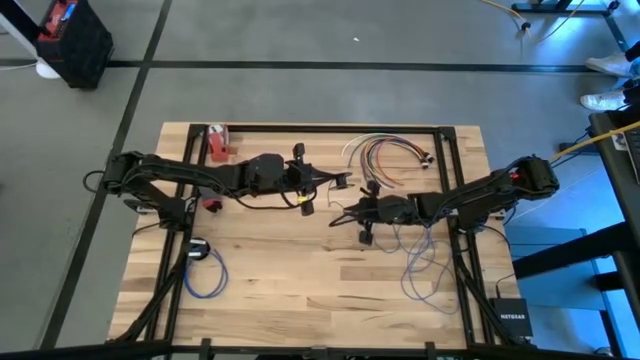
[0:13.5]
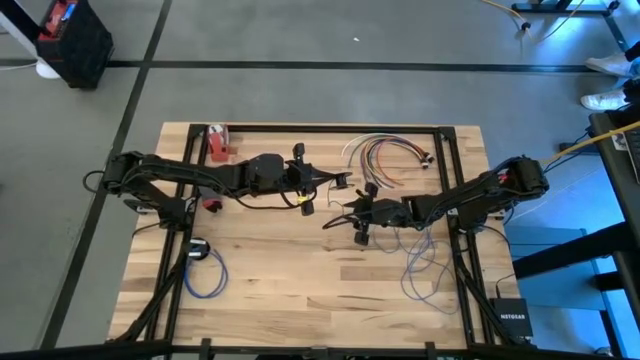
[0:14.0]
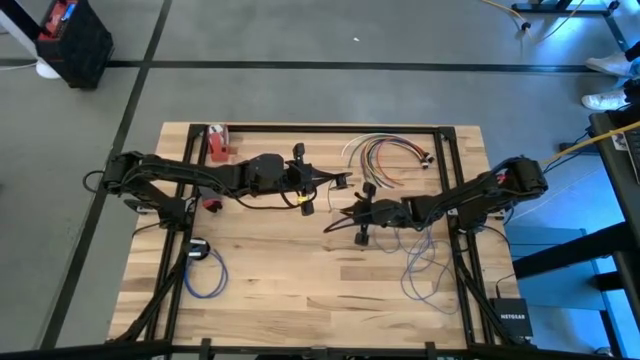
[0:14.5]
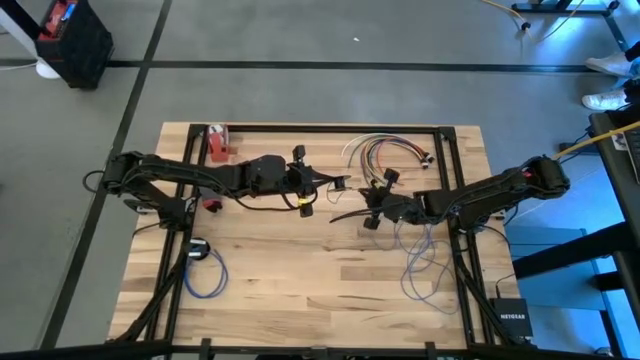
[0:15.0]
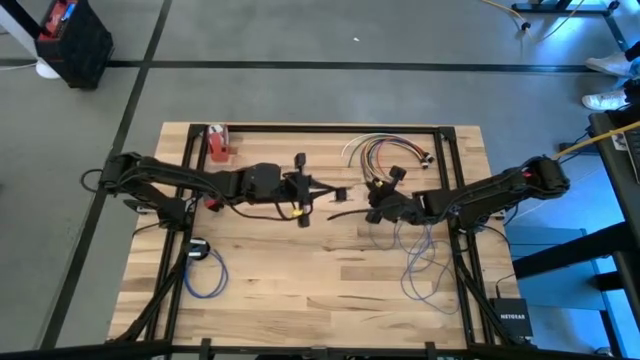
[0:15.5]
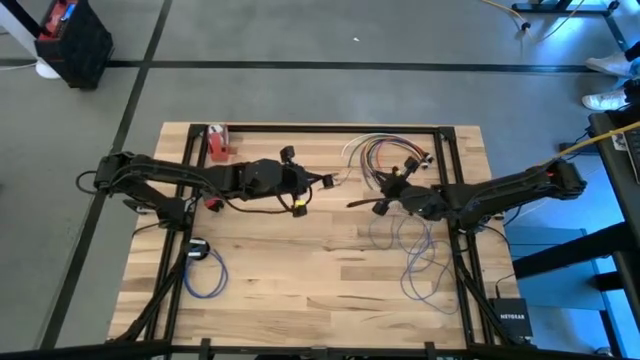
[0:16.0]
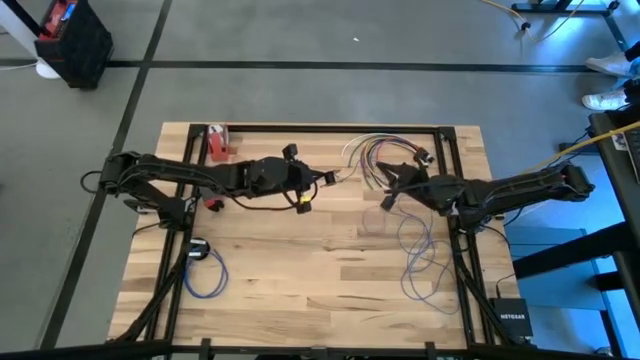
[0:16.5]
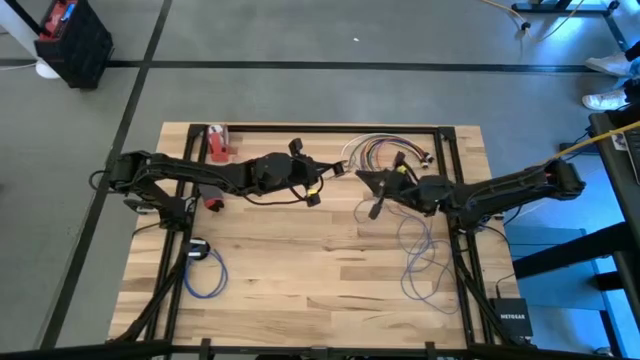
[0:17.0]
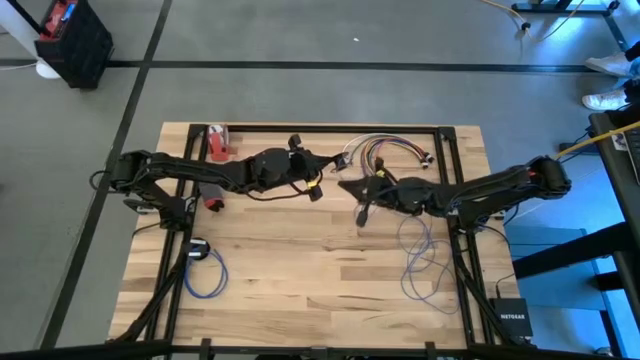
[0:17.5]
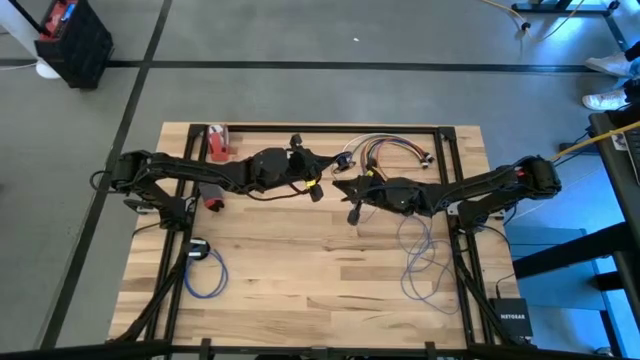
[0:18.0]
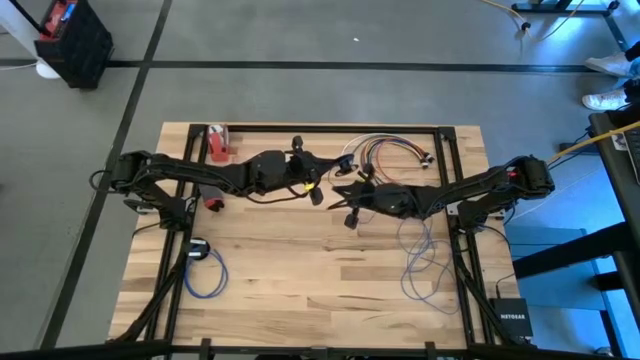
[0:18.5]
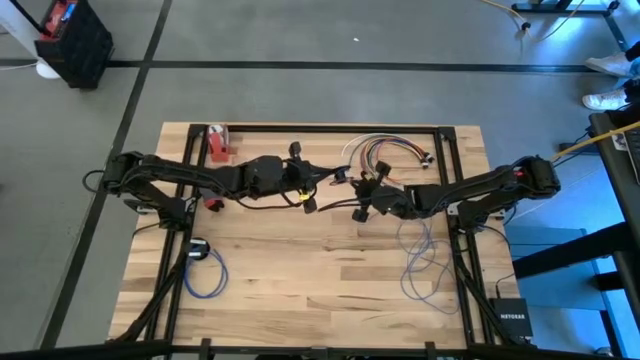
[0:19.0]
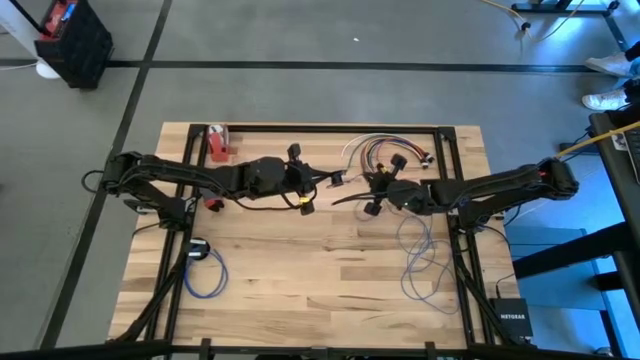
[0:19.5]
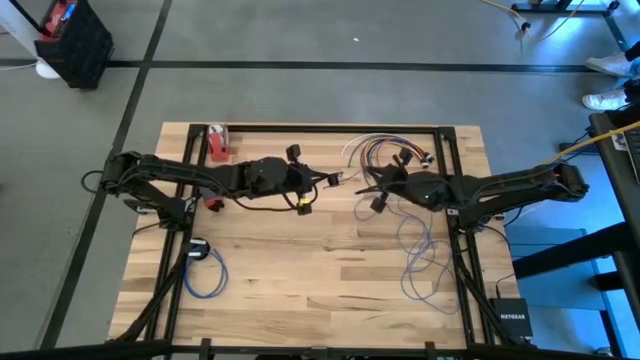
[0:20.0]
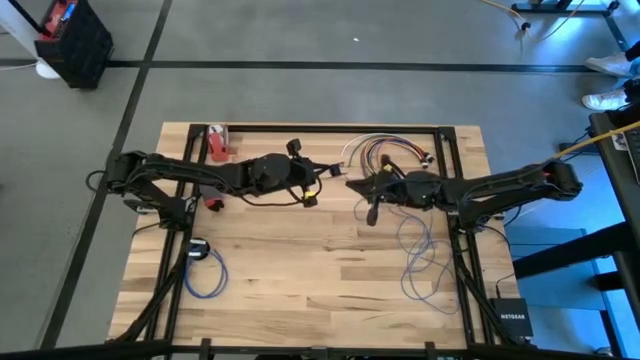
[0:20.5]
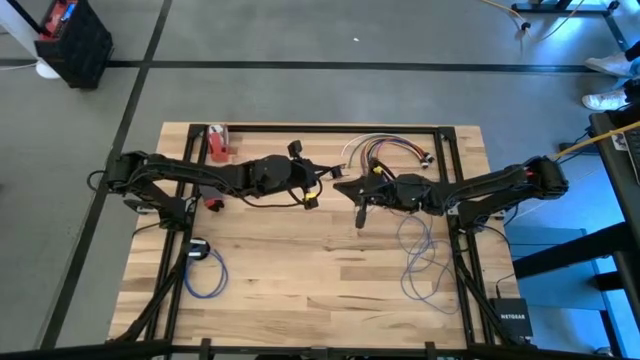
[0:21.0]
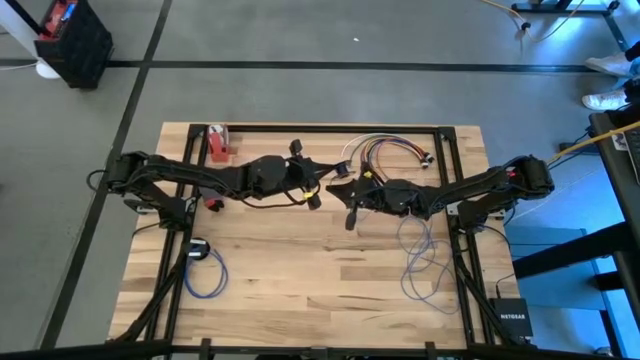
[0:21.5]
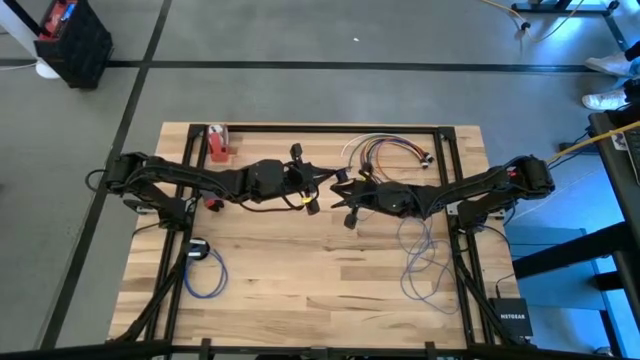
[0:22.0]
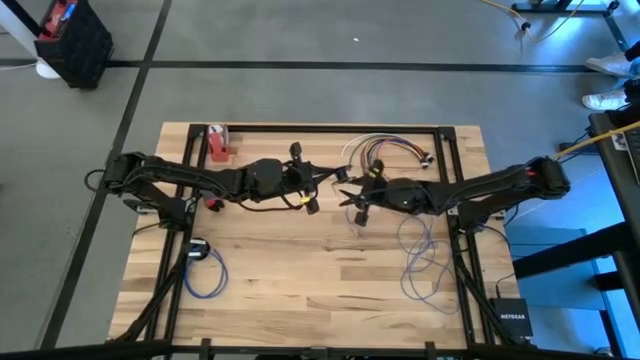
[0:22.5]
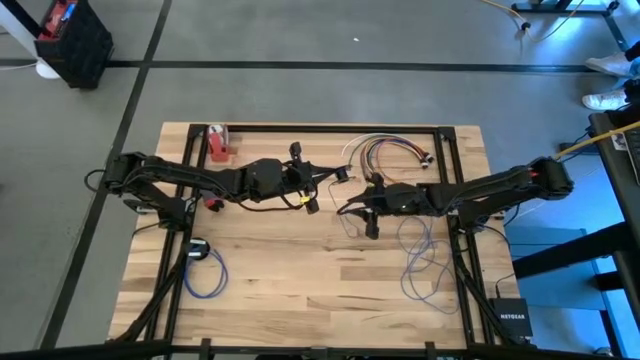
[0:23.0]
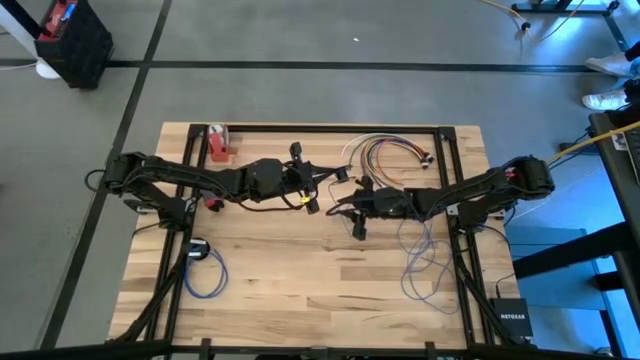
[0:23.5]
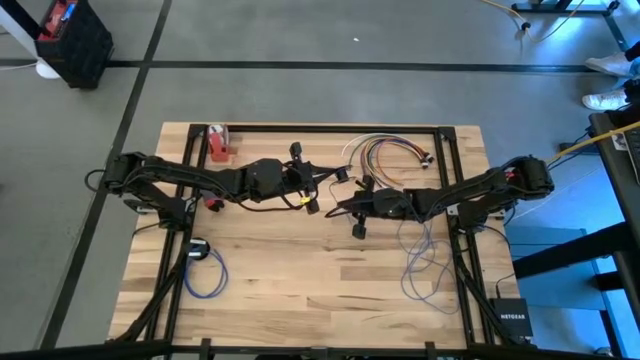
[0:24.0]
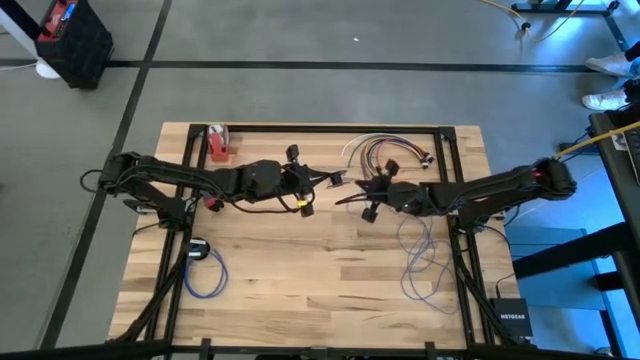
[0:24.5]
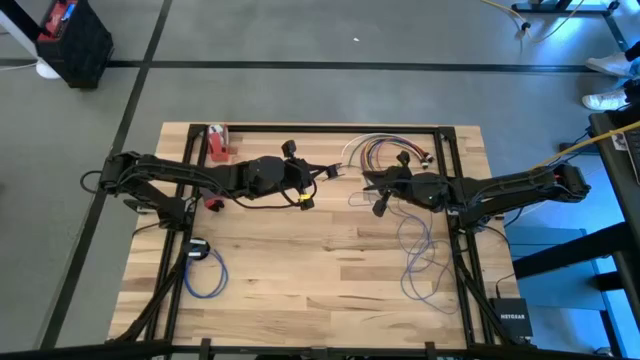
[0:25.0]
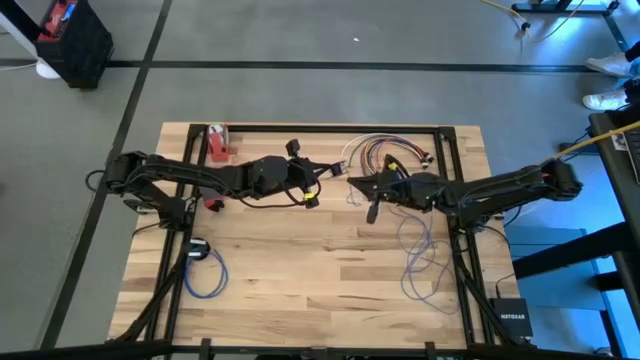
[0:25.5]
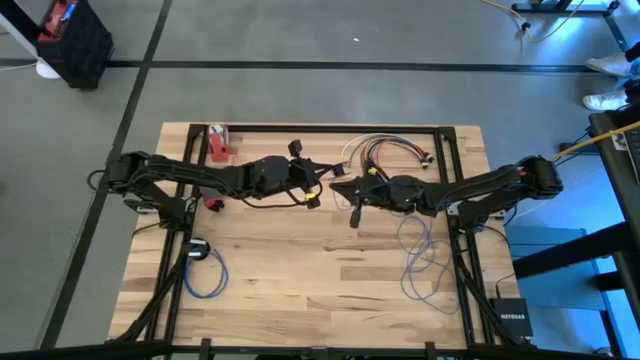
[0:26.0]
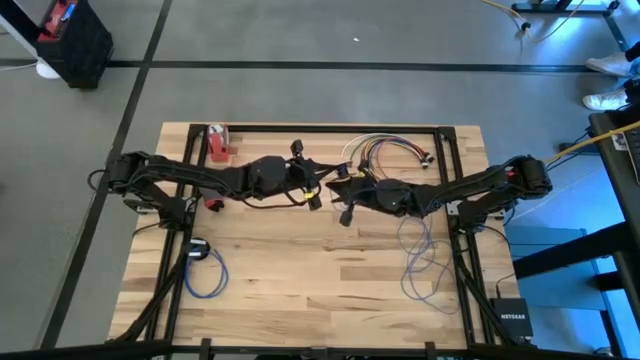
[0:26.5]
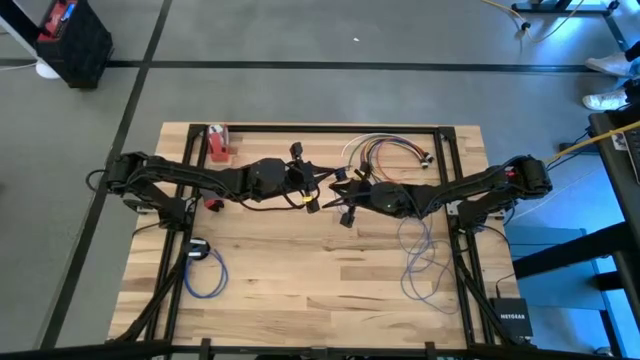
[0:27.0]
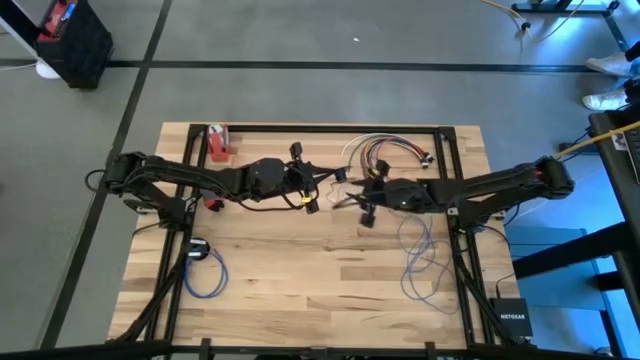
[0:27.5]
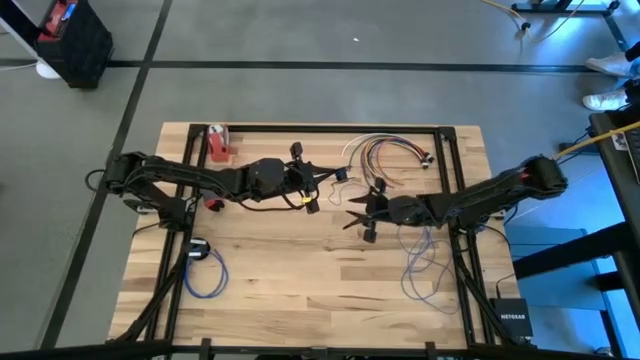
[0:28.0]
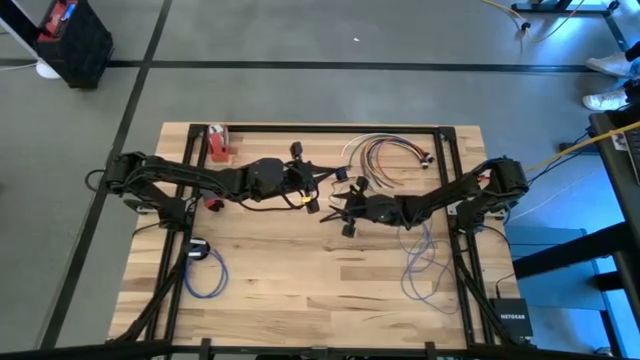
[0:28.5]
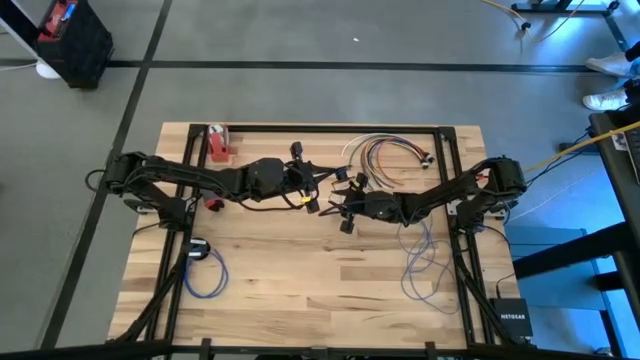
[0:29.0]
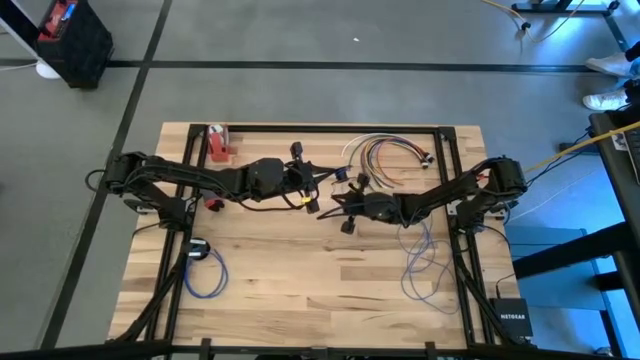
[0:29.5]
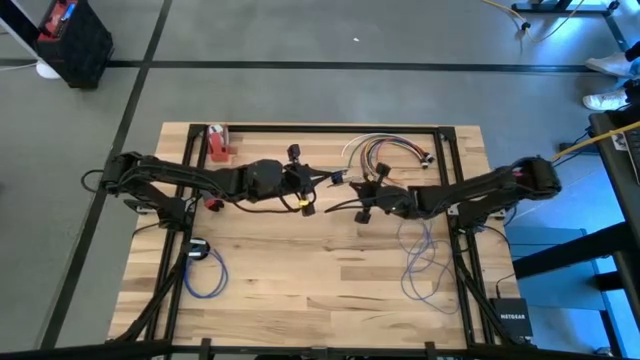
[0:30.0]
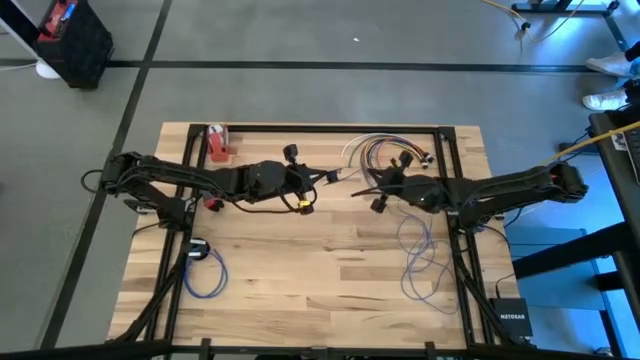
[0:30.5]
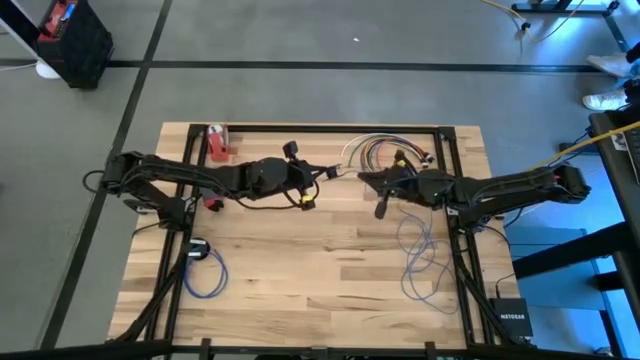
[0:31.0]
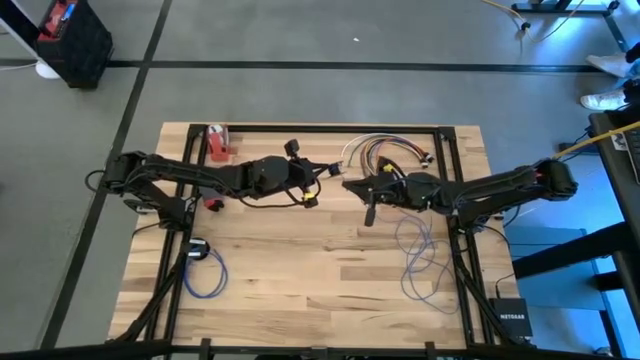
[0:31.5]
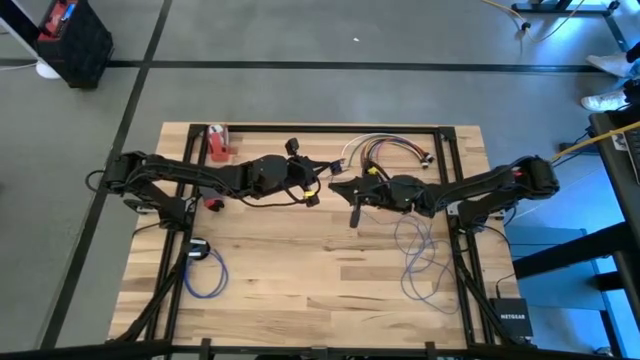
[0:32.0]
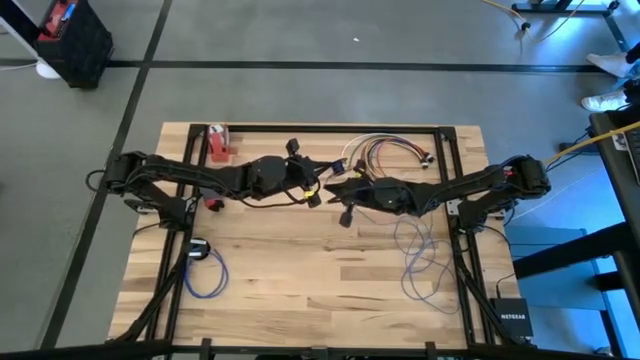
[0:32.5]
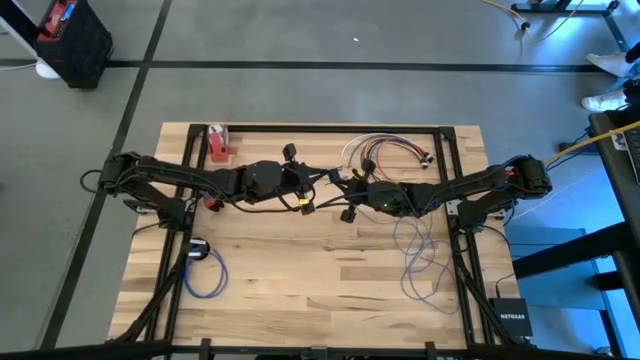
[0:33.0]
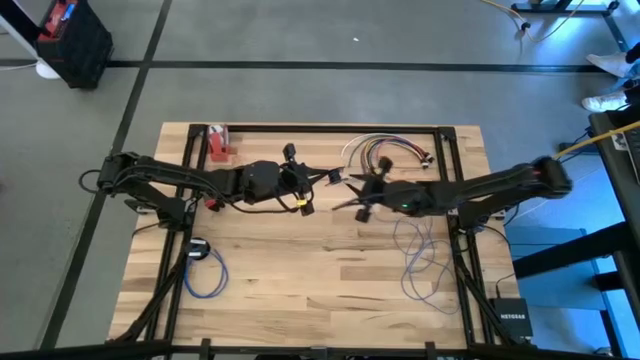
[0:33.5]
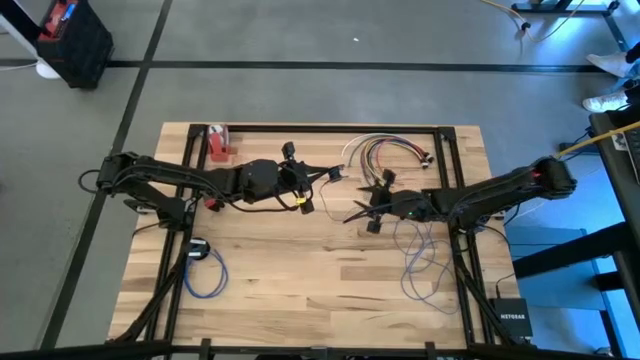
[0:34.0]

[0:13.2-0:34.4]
Task: Coil cords
Coil the blue cable wire on the black spool
